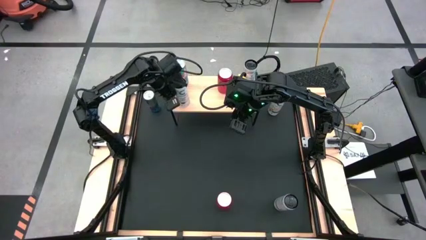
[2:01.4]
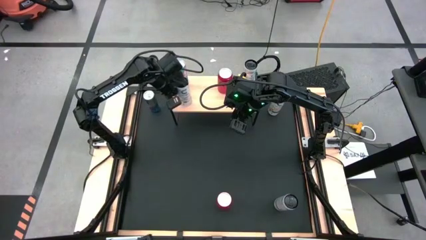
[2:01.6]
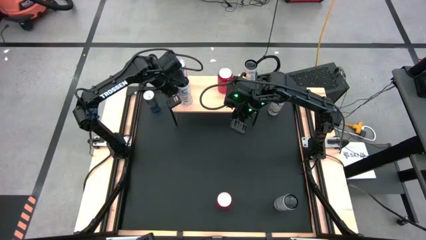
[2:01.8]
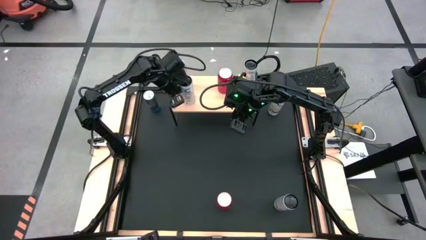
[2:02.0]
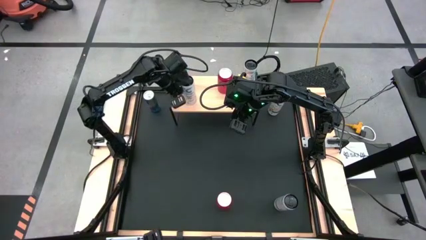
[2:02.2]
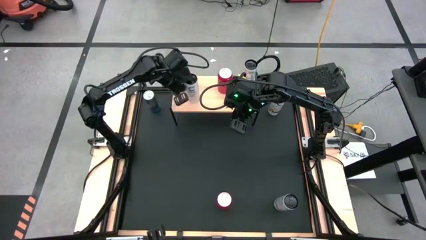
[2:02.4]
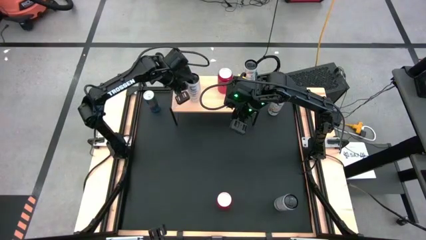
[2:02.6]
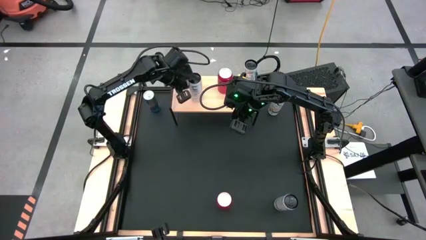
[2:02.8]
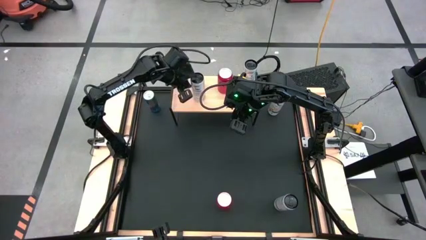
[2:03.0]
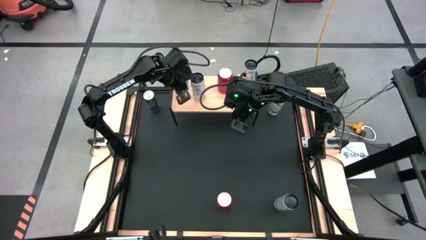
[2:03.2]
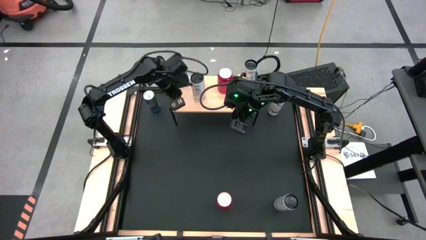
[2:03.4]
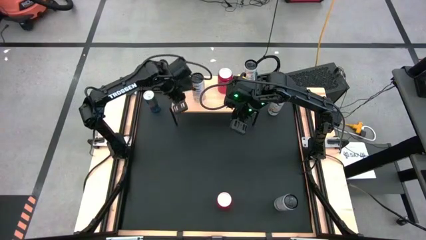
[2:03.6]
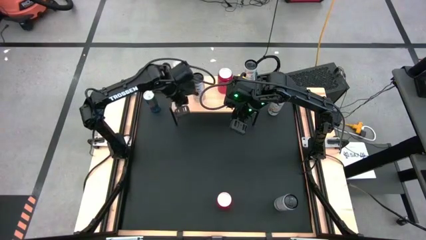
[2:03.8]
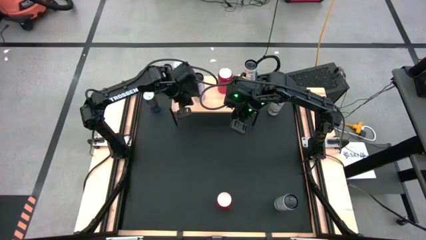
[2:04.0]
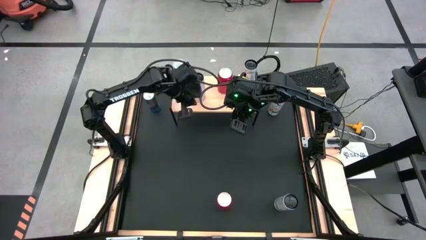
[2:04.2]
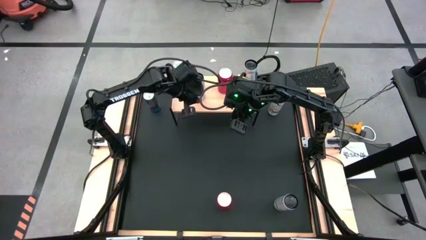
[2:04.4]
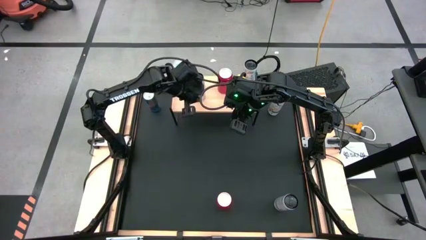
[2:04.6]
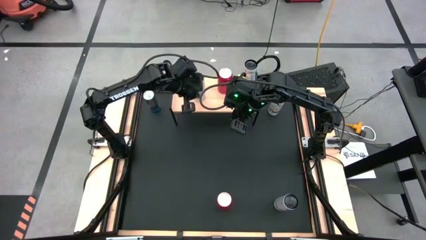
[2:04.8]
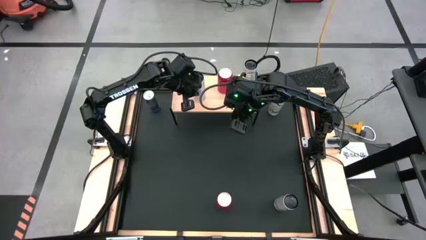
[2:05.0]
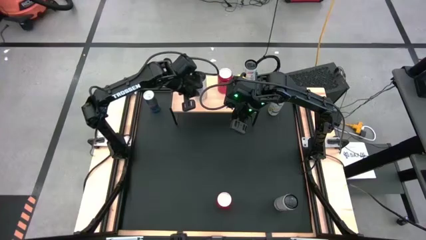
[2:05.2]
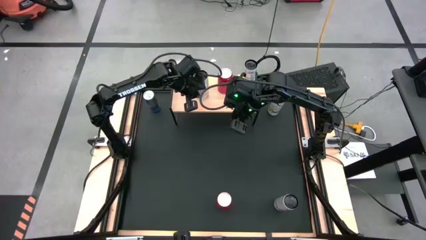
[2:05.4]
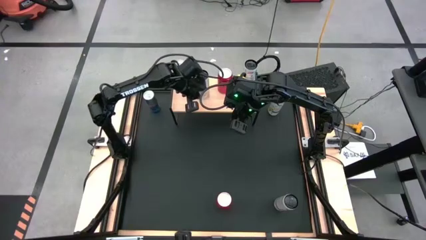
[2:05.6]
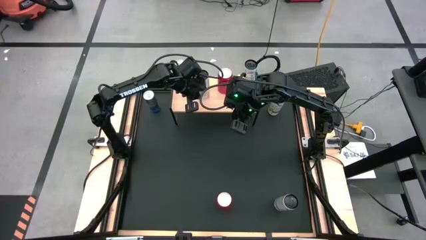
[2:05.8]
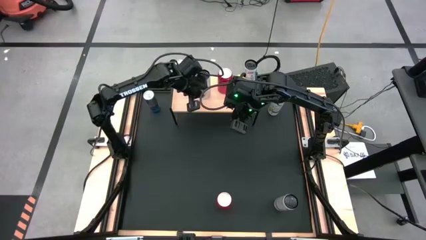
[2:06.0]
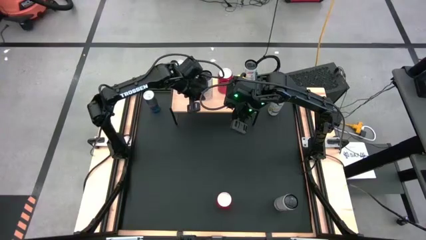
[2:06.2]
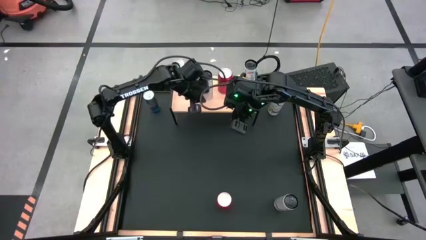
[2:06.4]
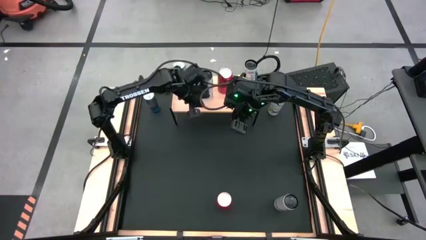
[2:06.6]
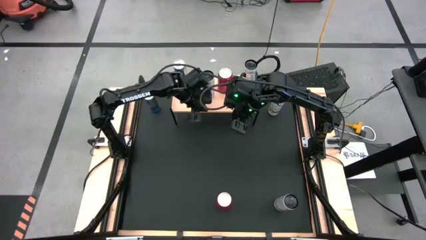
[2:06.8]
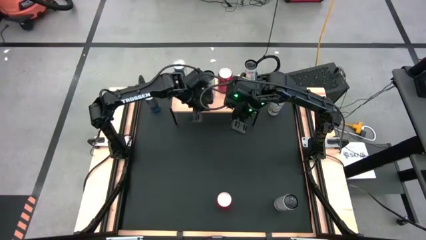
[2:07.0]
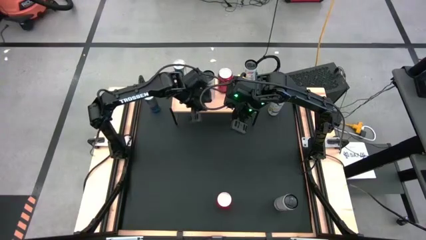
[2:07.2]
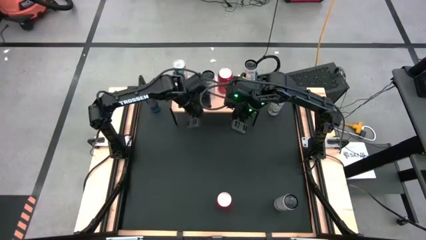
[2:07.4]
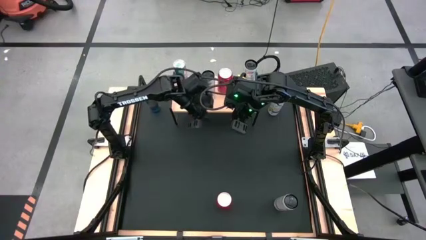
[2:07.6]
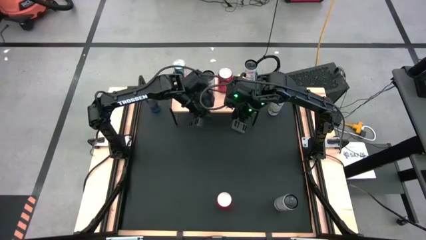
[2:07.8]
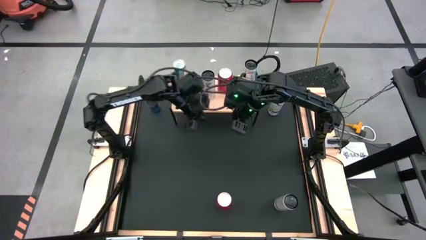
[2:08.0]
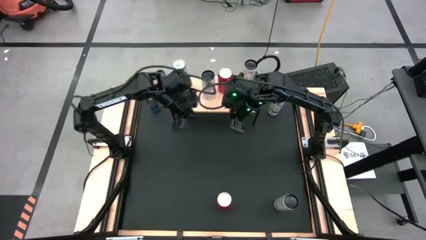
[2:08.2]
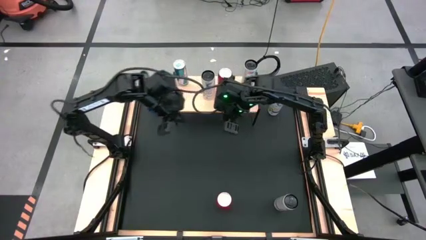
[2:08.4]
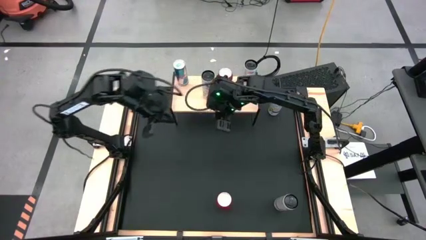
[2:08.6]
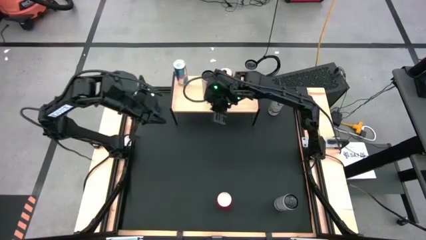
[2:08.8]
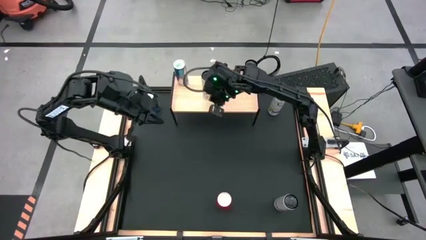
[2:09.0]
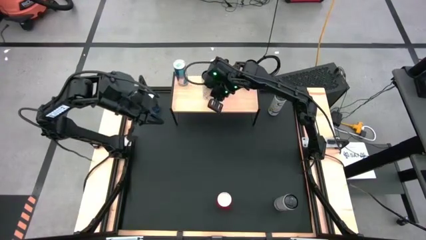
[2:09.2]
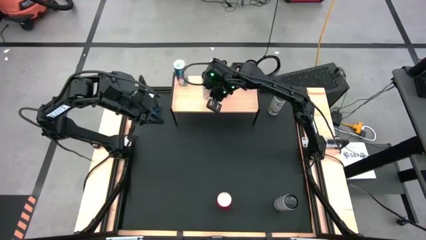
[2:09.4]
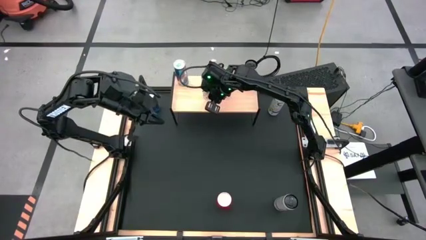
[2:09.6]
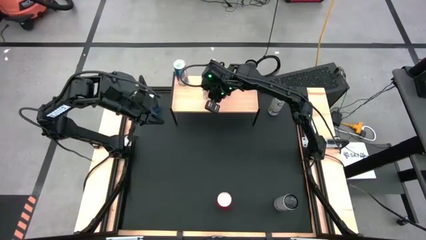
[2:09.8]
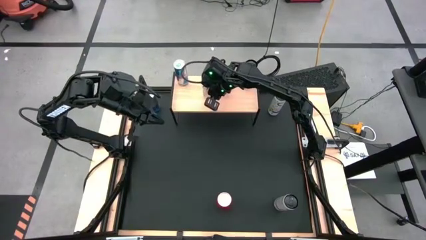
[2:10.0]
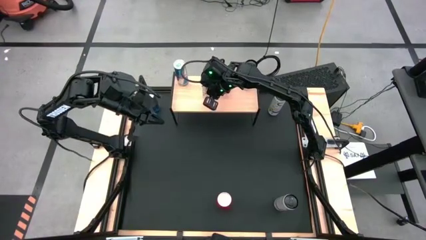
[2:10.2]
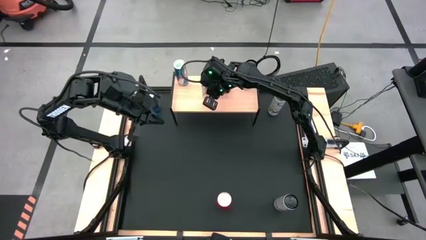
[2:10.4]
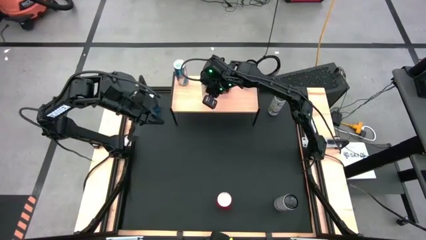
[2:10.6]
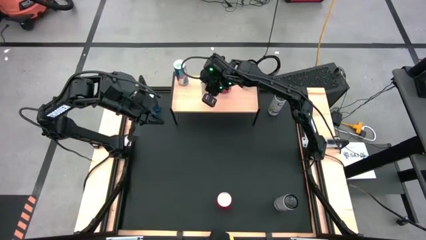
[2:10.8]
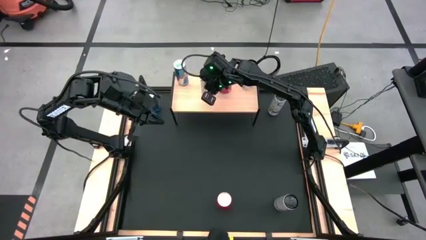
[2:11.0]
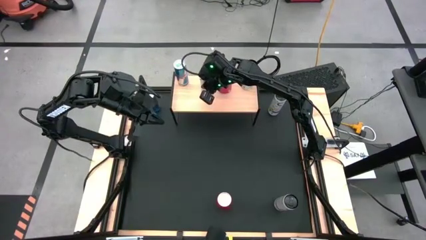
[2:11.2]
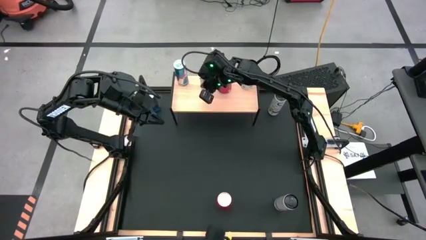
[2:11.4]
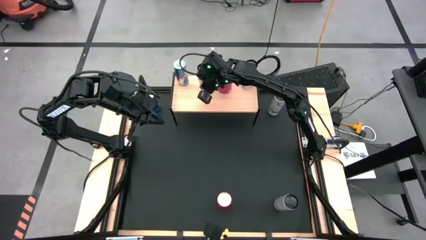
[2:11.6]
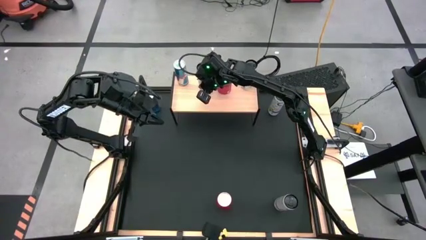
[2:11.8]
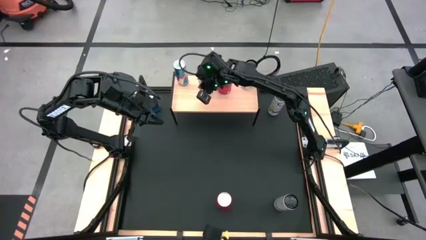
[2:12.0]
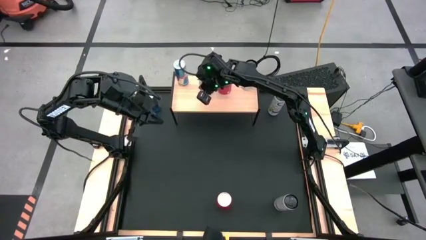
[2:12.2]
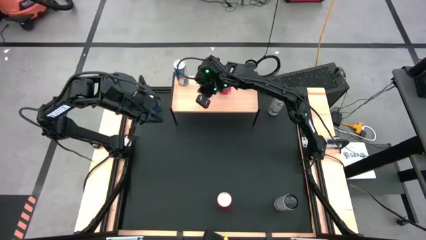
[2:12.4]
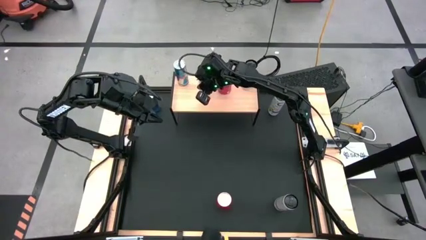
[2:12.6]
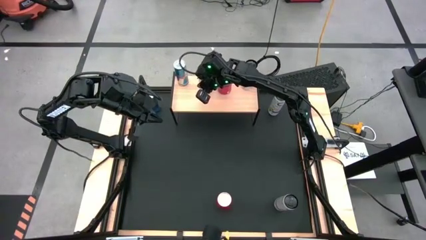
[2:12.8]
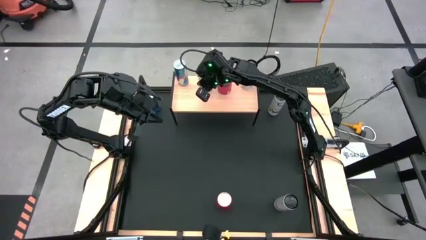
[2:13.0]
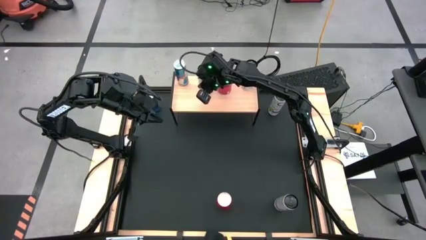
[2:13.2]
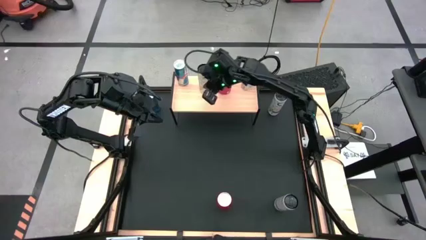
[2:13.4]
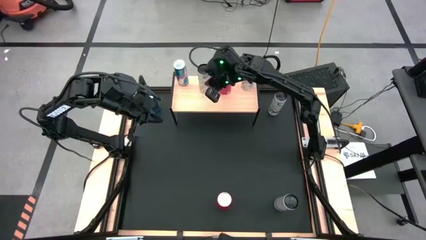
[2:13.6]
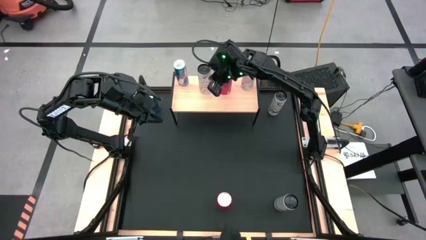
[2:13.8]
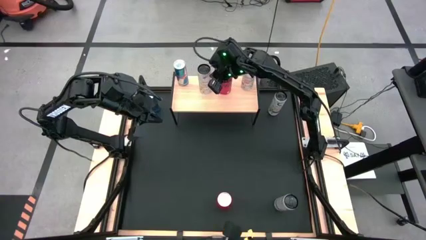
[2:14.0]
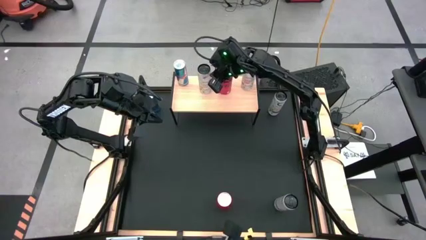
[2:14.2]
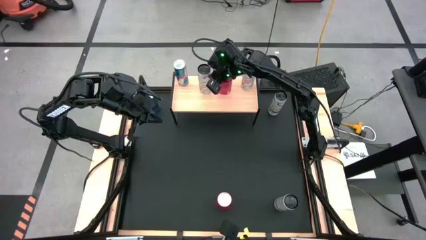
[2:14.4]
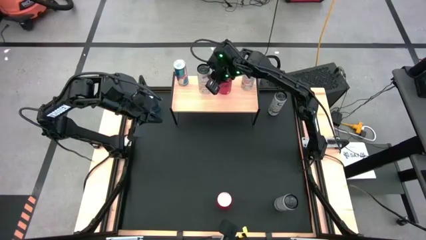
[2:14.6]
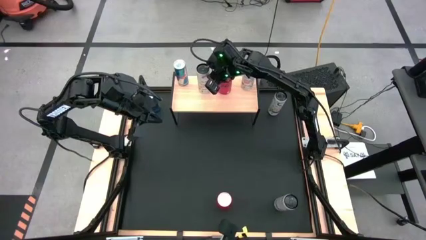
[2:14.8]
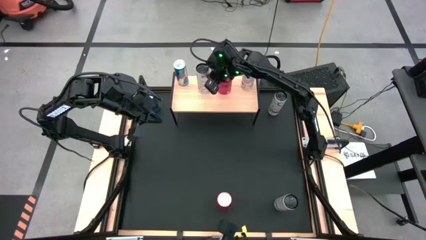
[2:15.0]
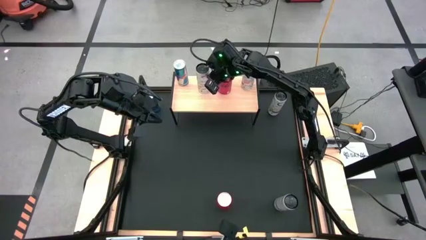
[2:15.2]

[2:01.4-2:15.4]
Task: Place canned beverage on shelf
Put the bottom white orange soda can on the shelf
